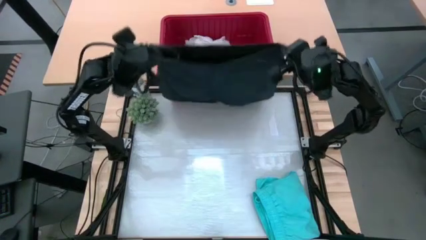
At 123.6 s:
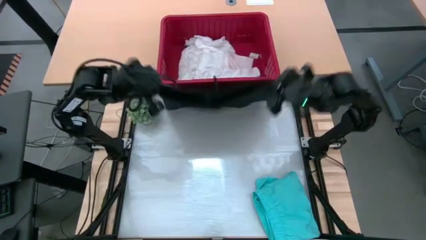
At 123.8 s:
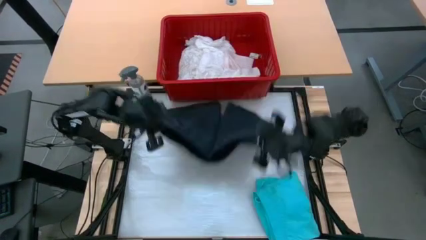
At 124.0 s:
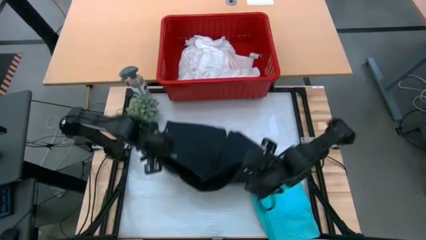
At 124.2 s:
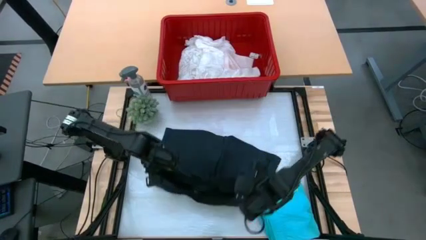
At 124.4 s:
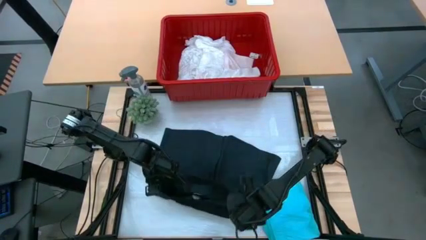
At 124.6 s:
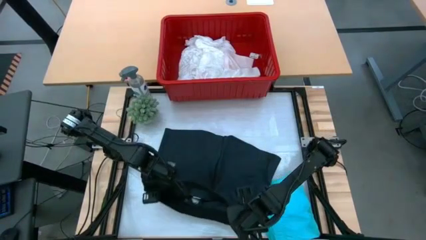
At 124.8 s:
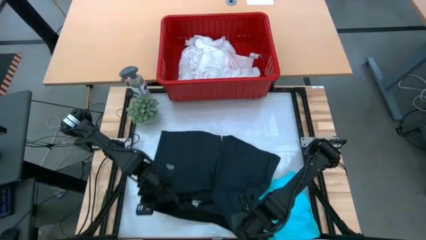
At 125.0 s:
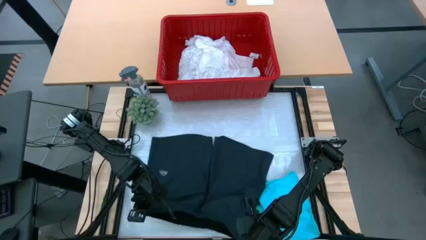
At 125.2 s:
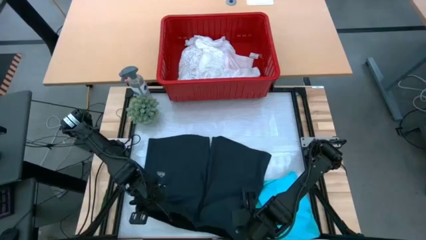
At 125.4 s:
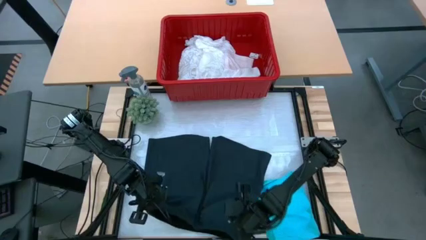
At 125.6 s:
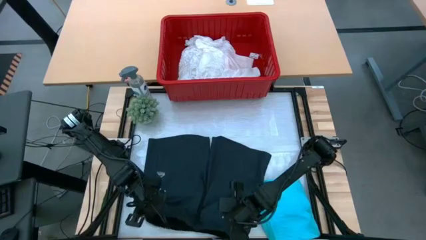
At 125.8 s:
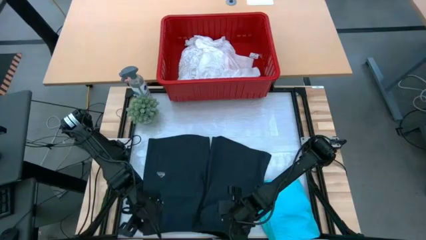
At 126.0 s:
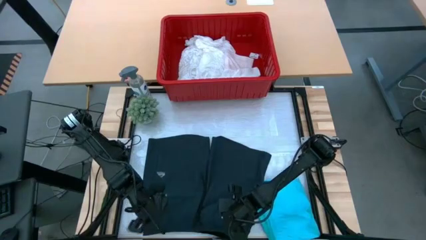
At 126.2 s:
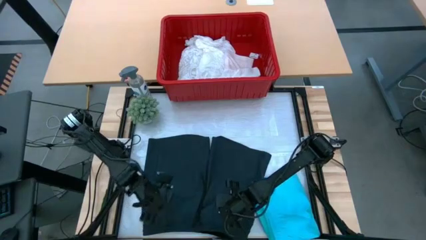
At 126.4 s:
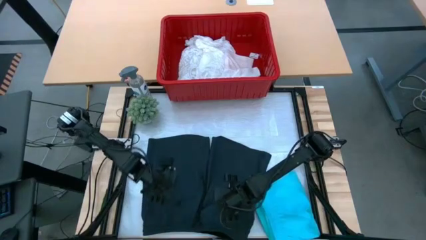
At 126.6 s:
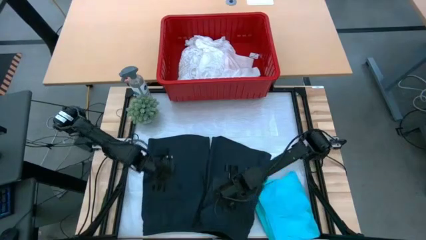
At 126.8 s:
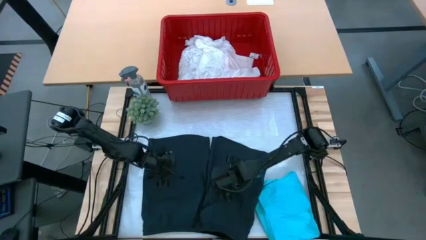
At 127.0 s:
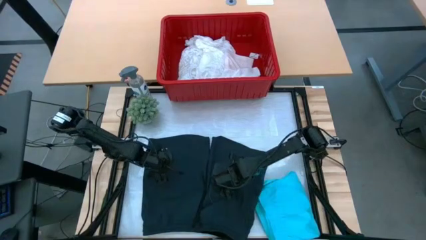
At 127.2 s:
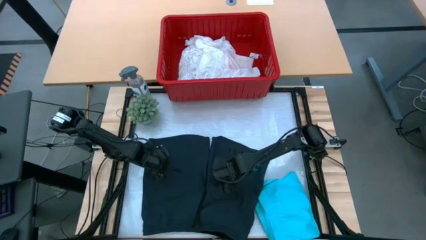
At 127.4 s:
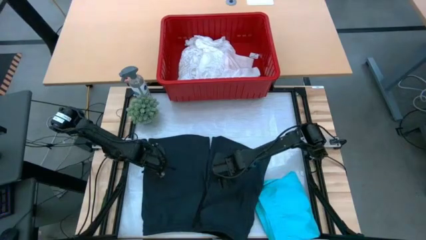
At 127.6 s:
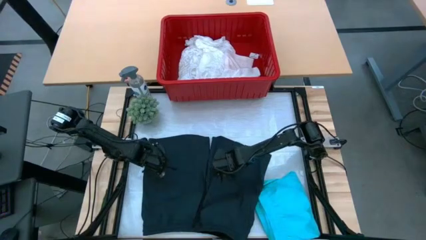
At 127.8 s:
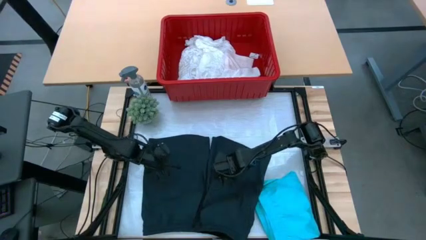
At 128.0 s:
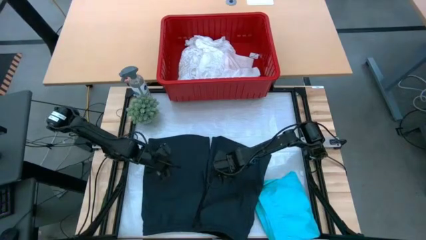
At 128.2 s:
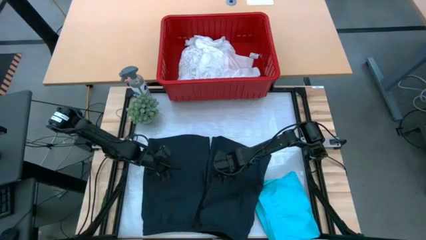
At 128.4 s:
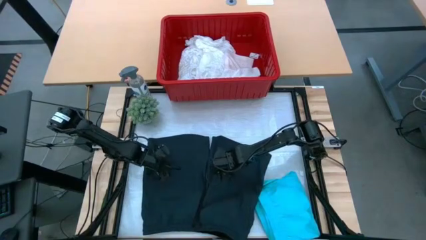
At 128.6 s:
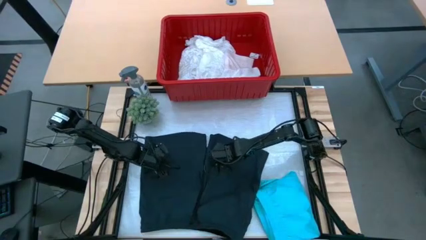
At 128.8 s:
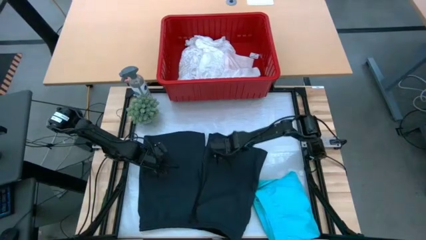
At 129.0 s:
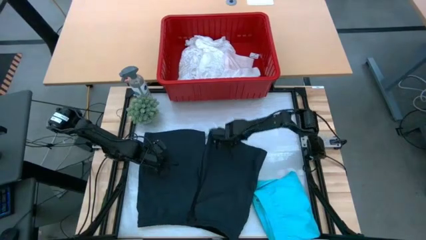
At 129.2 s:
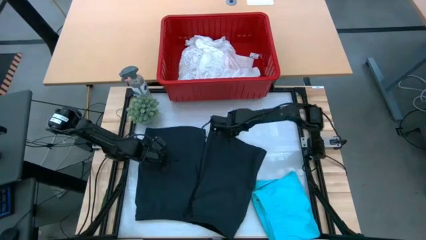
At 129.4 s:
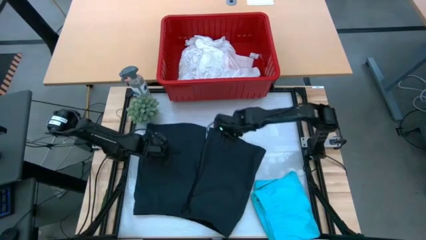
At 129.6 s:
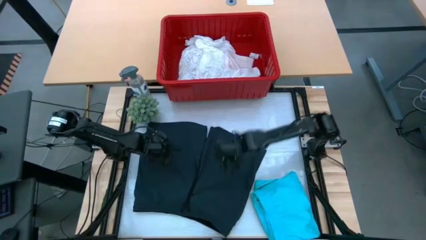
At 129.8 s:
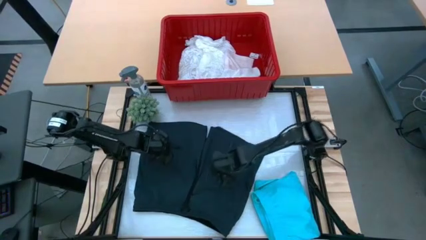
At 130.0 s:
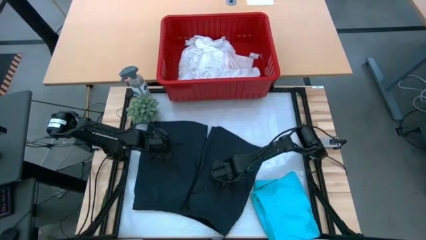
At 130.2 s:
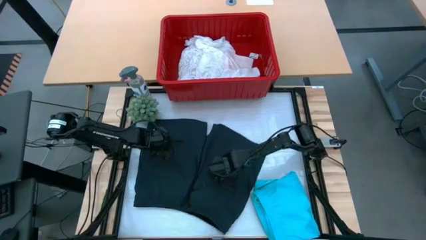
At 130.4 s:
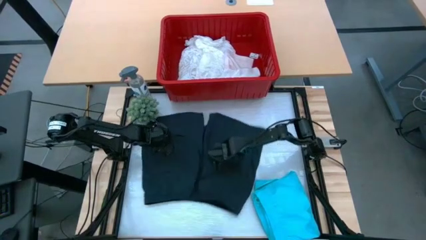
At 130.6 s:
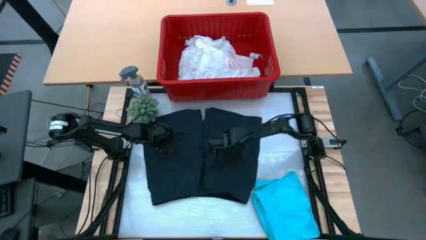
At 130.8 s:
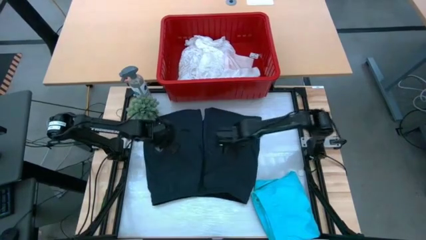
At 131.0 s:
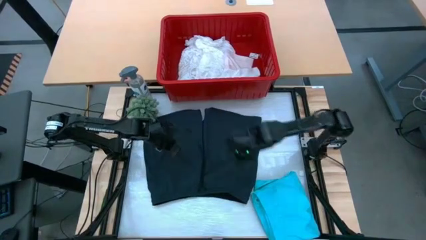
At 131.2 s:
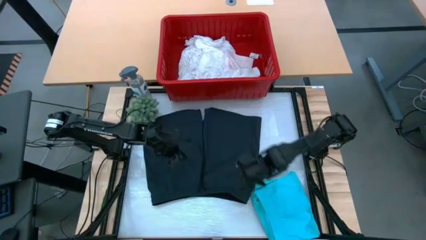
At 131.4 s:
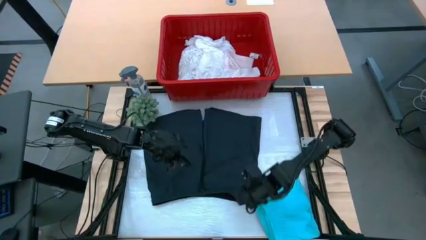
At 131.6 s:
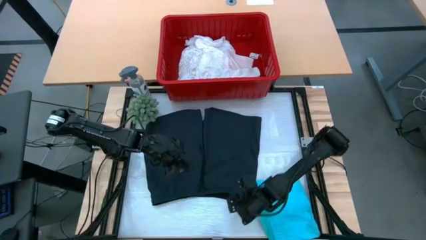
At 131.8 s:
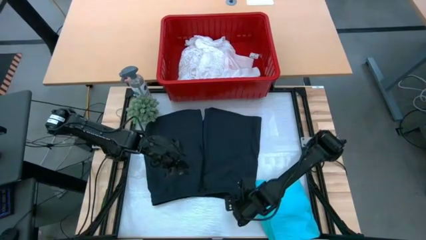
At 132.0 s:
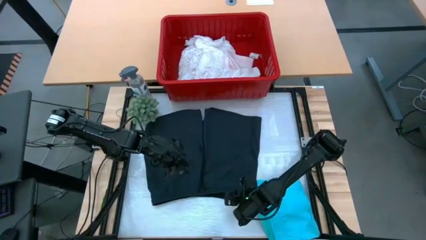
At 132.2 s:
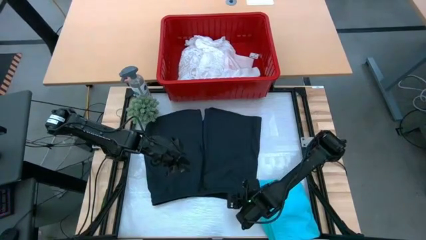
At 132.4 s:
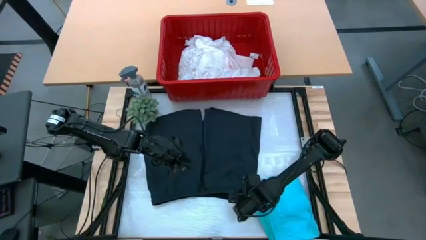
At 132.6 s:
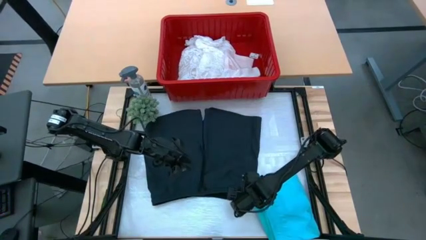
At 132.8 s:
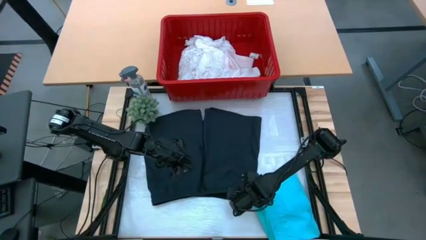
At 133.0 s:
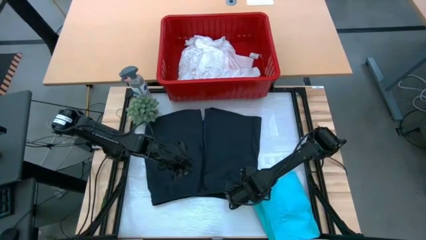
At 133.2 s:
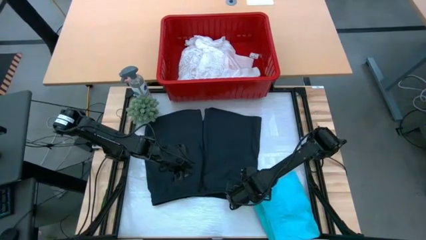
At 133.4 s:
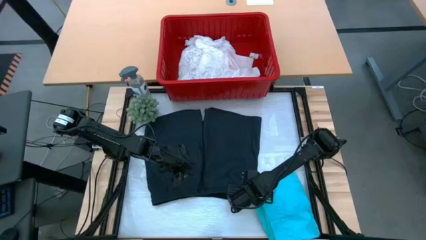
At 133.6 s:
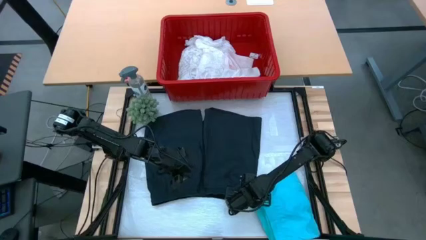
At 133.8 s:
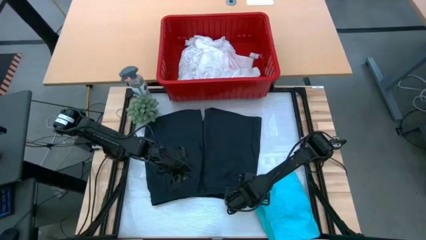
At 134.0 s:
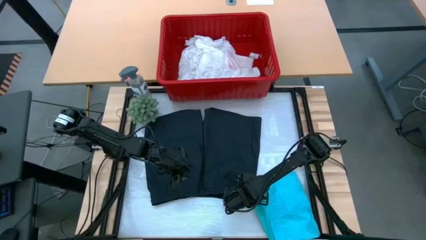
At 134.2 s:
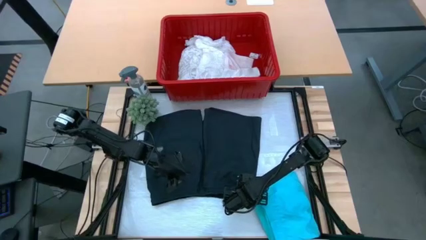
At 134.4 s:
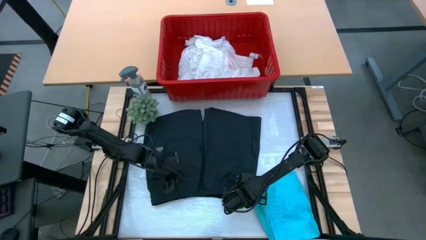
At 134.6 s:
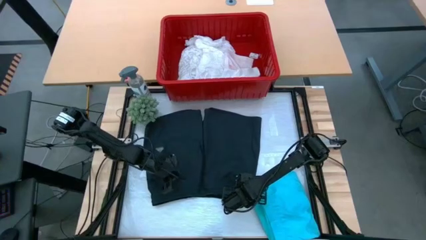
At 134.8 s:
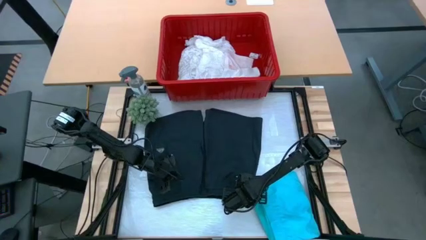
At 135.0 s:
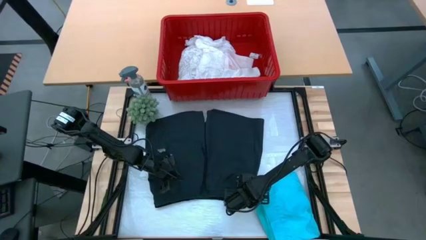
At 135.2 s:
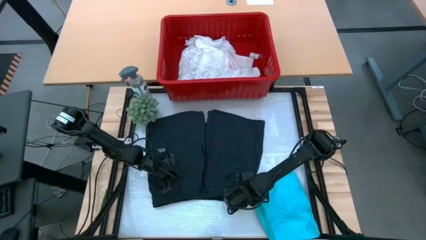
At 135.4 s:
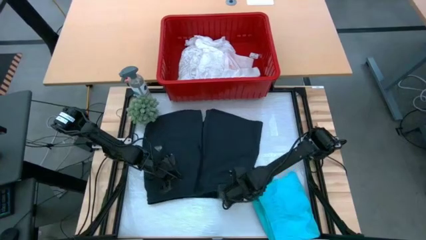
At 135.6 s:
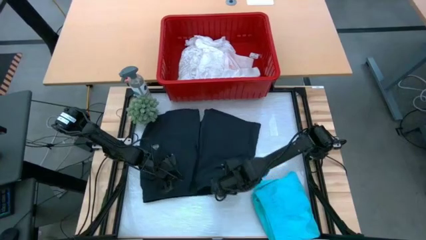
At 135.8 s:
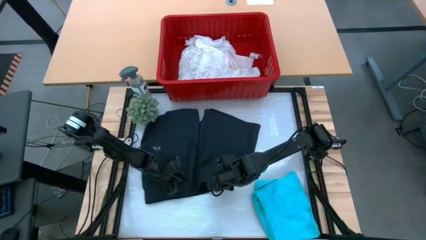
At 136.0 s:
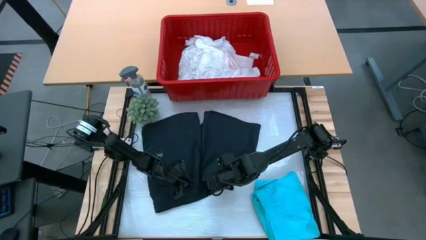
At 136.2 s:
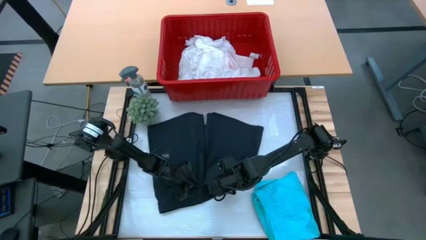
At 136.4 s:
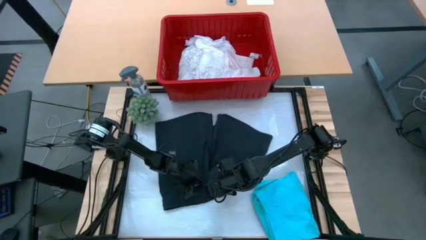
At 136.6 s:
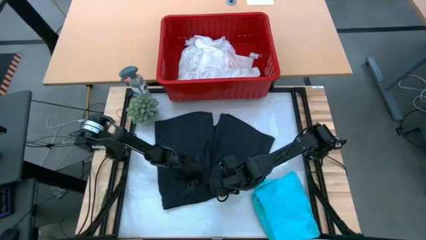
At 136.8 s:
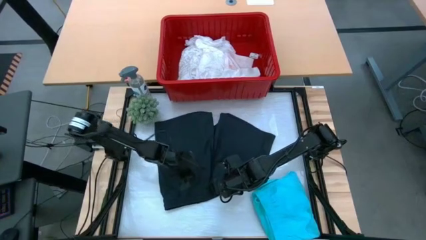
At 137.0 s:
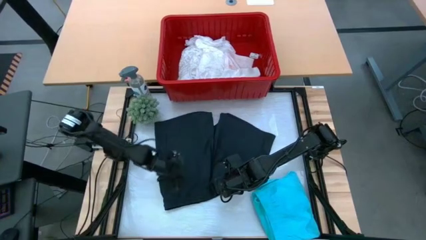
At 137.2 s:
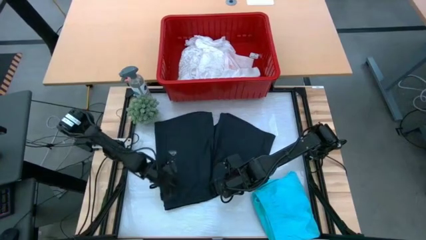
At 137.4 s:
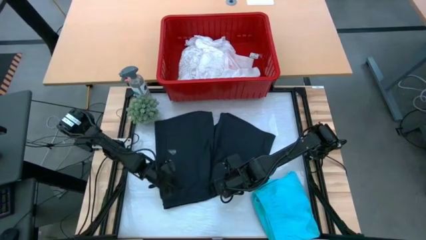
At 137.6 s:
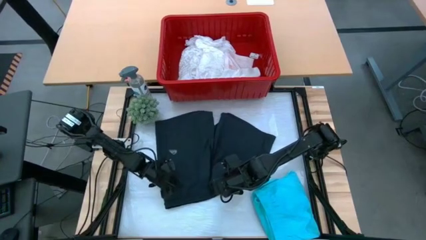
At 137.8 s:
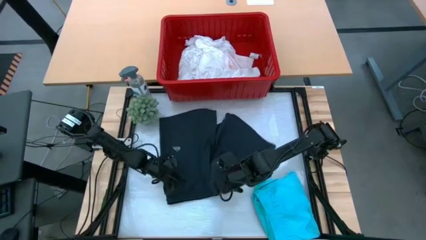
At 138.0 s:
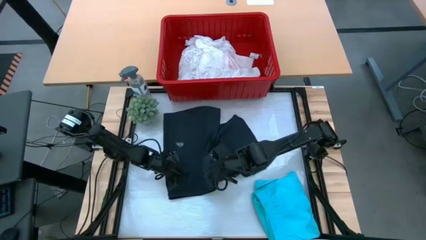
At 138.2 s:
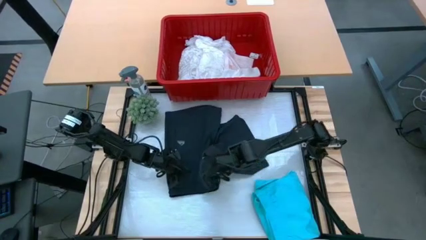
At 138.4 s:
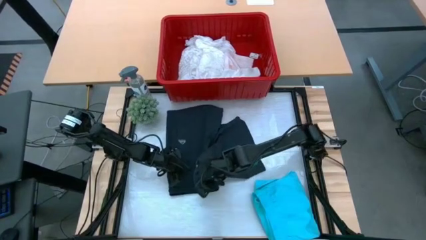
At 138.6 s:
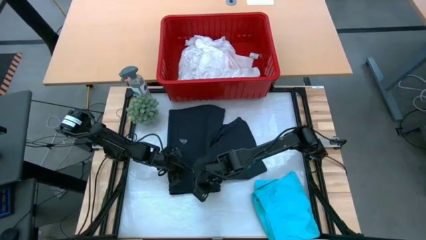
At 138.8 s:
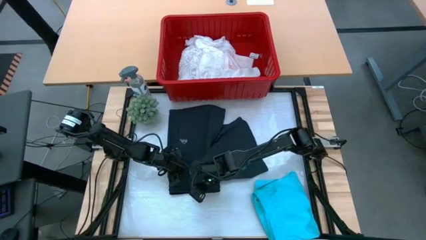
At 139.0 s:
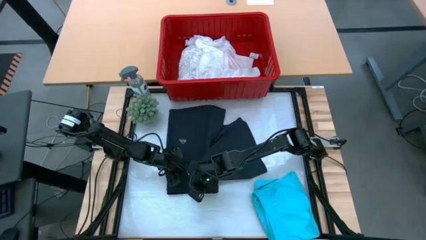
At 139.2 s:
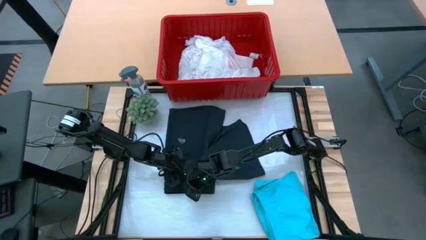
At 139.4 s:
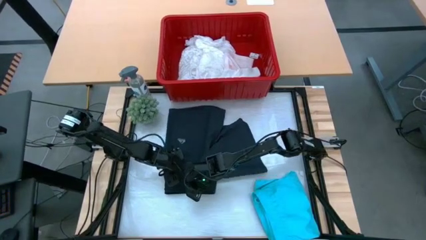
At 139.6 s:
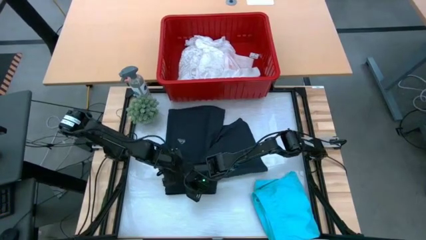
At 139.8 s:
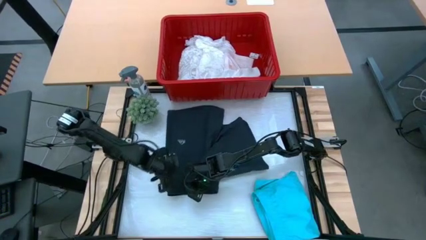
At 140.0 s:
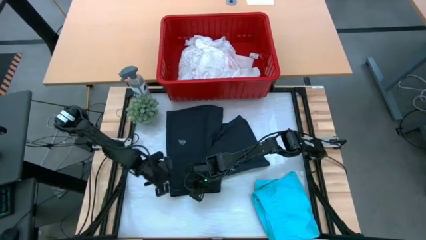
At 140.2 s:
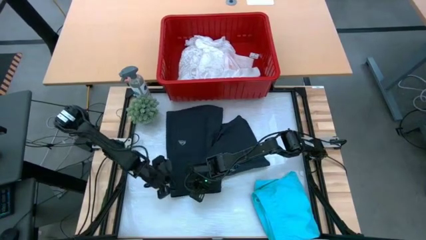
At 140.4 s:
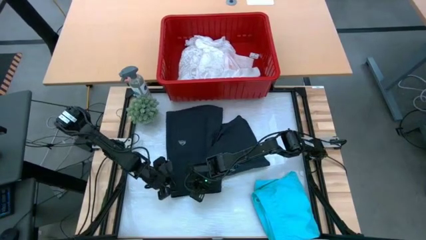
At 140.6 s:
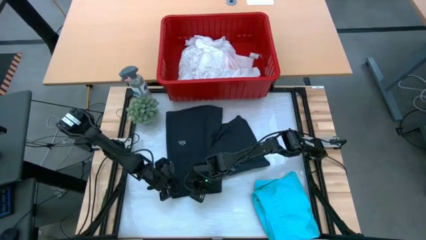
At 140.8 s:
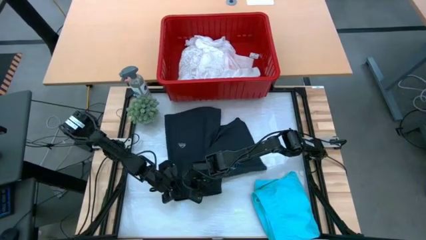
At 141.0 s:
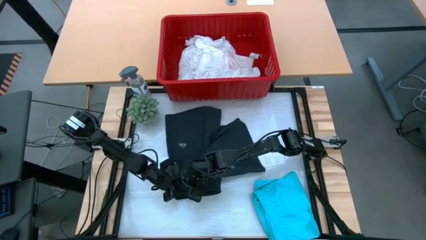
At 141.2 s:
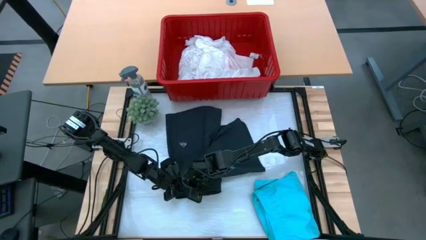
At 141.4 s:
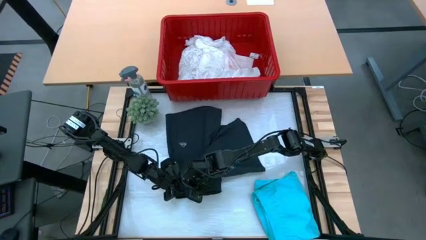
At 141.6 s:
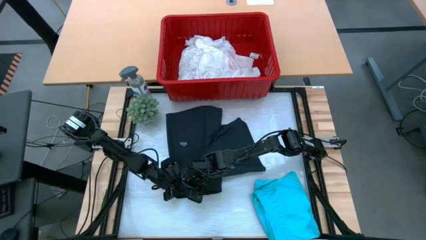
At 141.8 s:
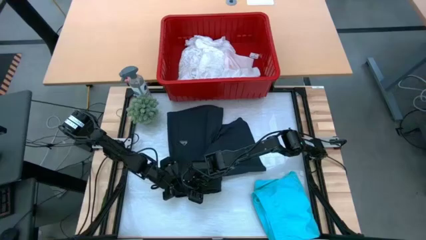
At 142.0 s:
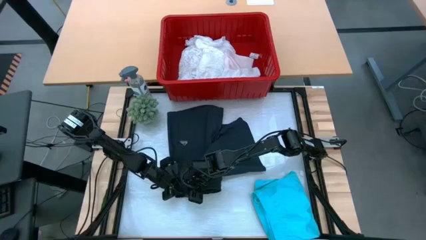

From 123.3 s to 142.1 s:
Task: Fold Laundry from Bin
Fold the black shorts
